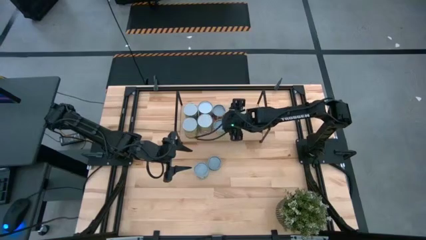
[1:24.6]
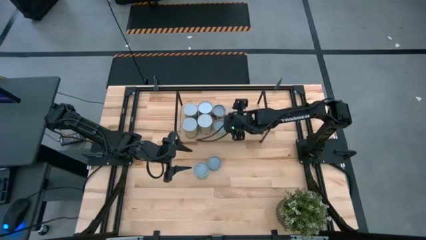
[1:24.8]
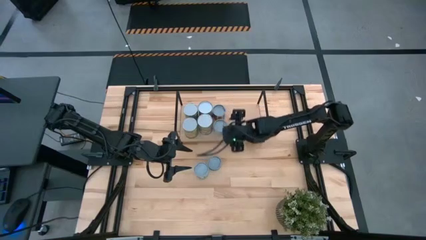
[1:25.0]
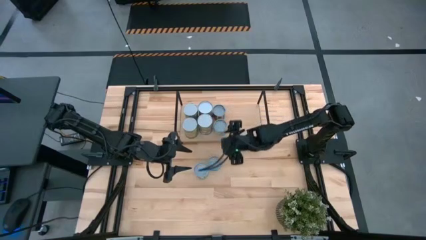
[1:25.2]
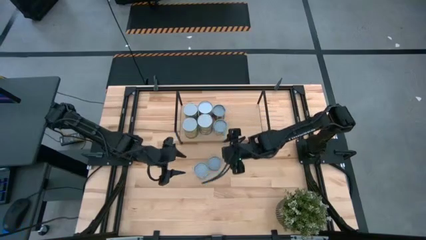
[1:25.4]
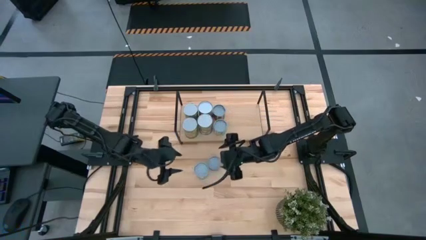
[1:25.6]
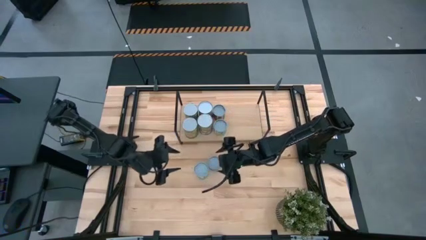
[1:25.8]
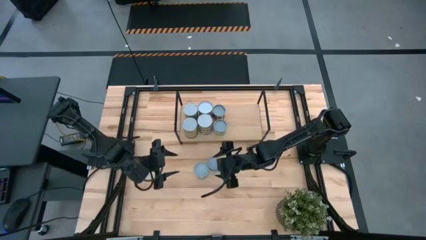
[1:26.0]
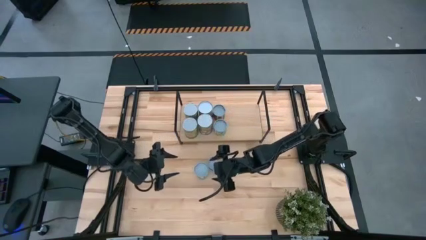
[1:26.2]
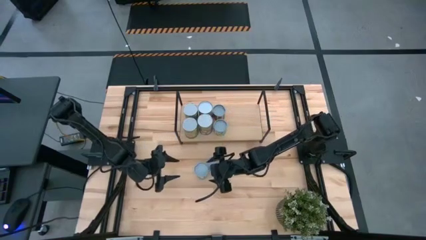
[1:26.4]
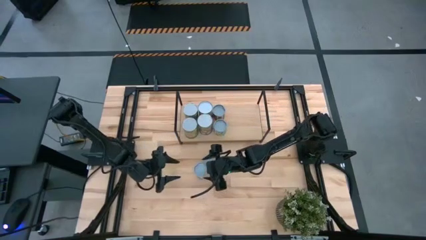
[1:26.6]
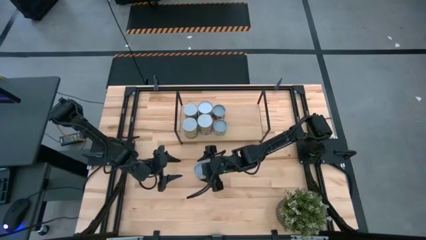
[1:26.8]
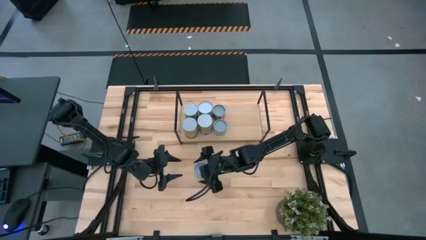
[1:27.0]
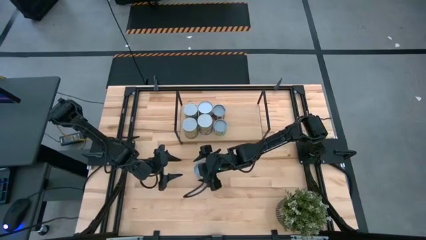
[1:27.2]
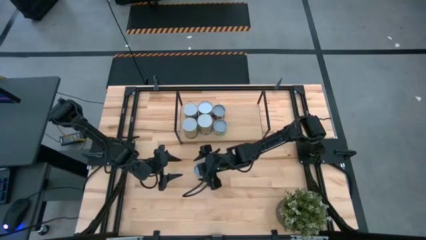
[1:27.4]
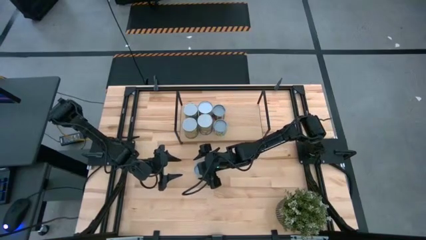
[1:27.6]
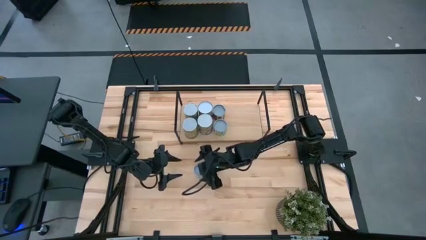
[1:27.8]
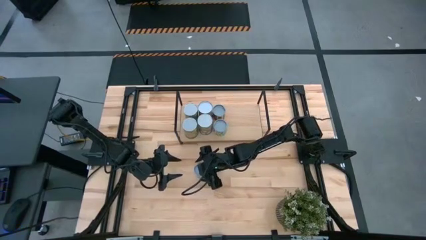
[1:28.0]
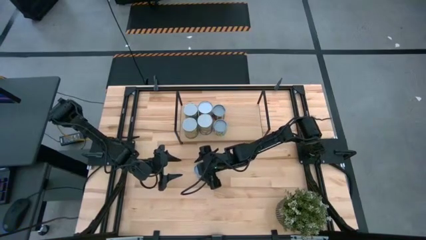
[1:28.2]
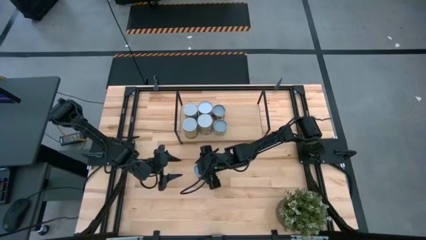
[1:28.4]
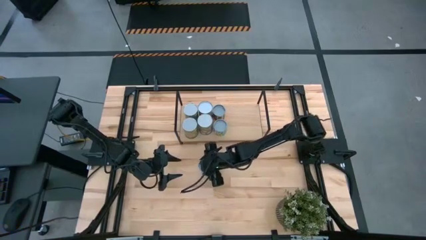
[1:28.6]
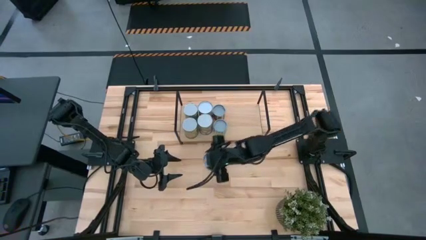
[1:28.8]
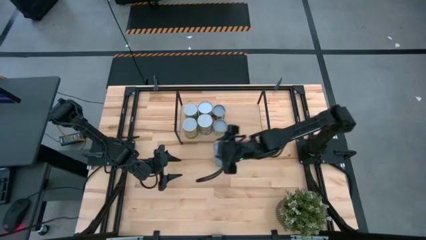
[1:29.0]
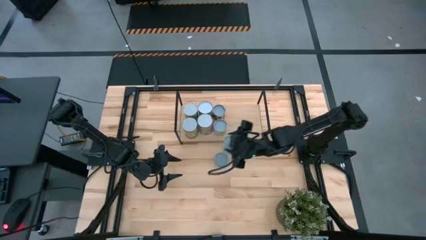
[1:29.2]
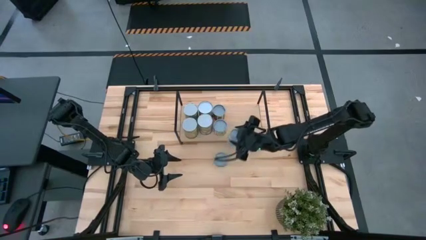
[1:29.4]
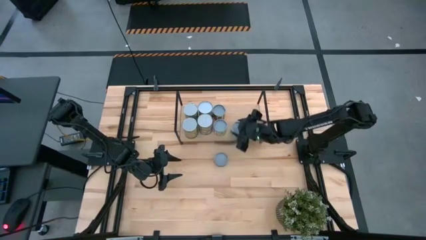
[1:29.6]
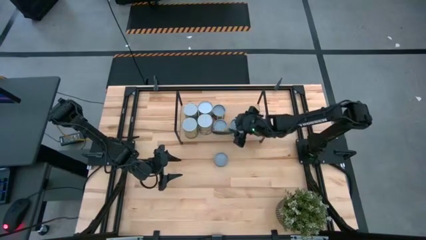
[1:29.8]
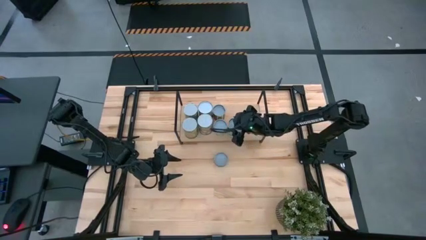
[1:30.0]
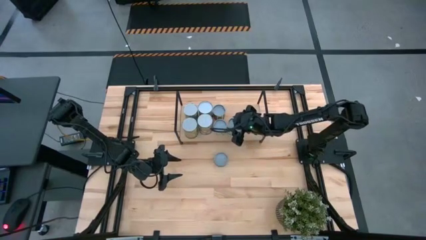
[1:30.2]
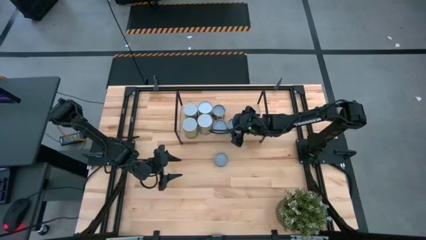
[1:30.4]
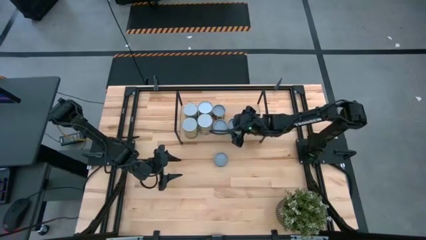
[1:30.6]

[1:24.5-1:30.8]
Task: Pick and place cans onto a shelf
Put the canned mixed vegetables on the shelf

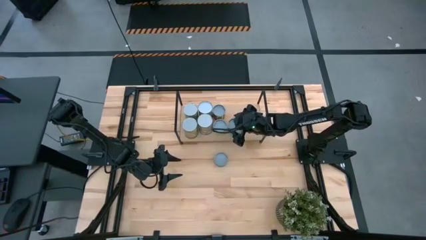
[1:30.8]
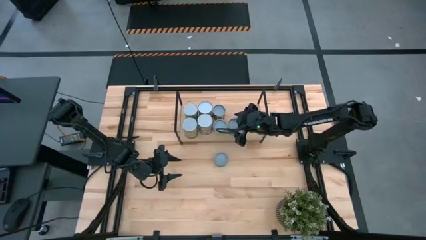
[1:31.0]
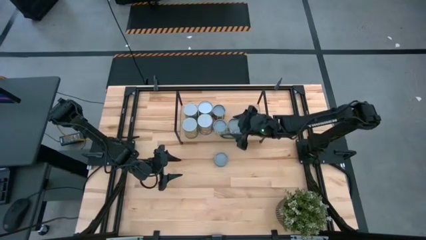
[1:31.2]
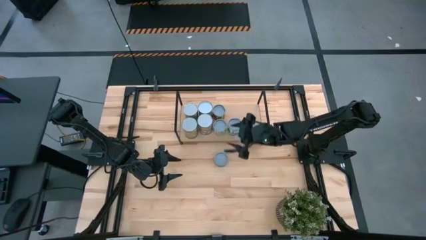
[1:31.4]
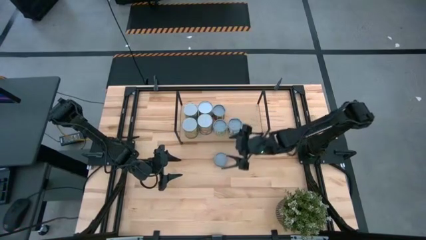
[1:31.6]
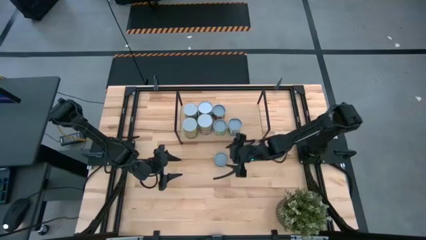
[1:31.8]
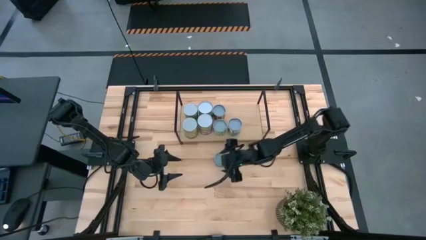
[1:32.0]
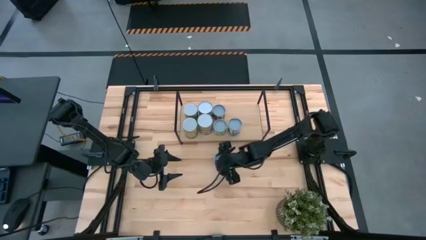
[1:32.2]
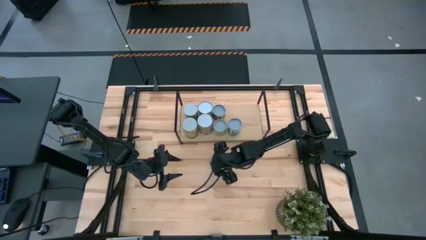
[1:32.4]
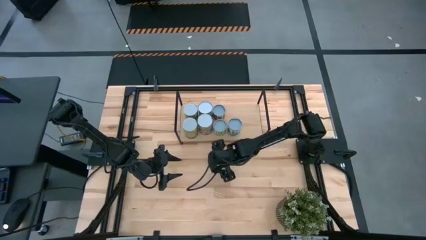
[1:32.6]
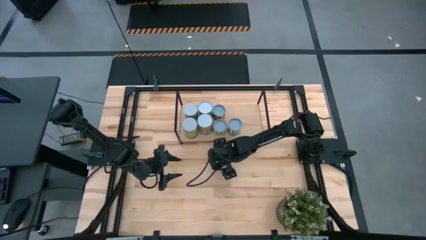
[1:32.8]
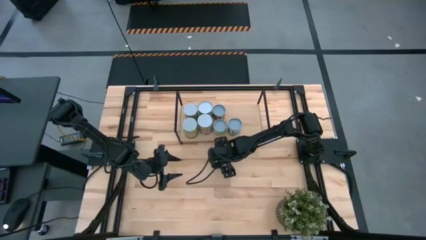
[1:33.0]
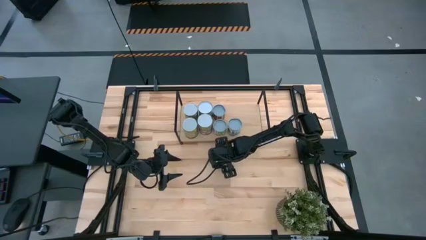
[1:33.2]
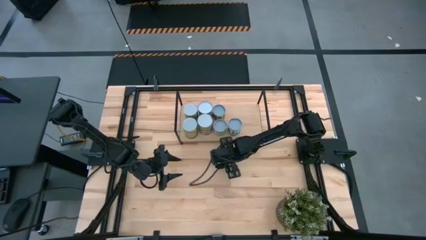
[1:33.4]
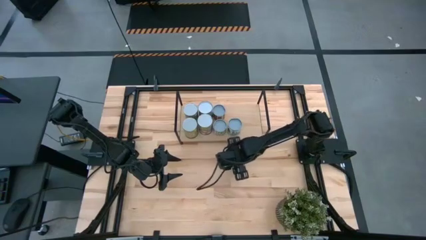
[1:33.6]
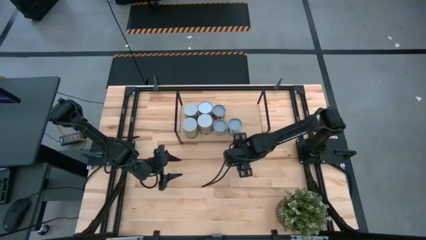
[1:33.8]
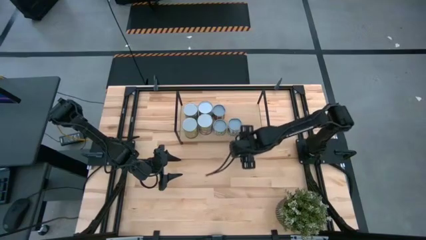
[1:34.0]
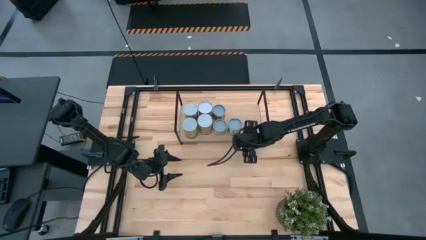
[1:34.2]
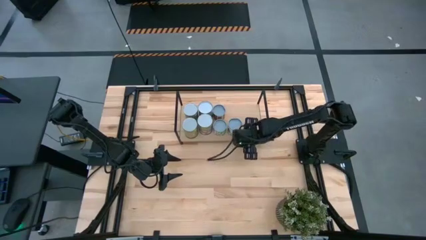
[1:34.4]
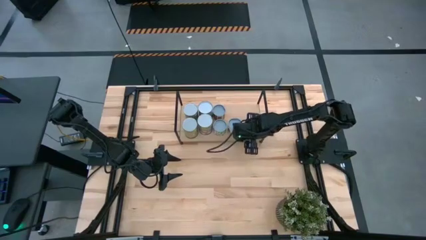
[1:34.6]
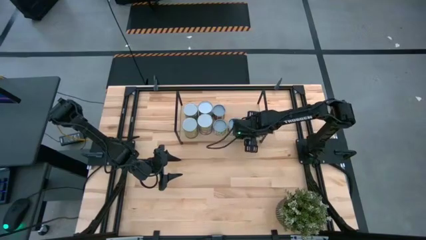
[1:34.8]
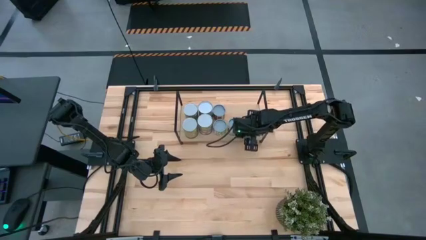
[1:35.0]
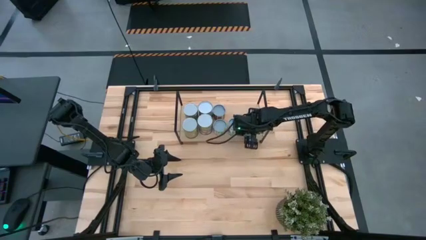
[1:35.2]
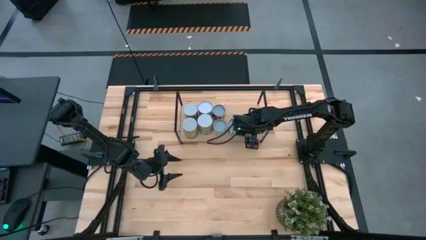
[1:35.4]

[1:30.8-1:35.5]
Put the canned tuna on the shelf

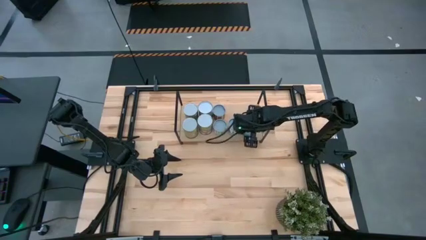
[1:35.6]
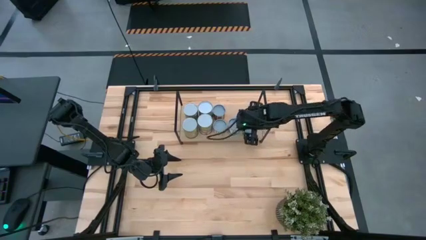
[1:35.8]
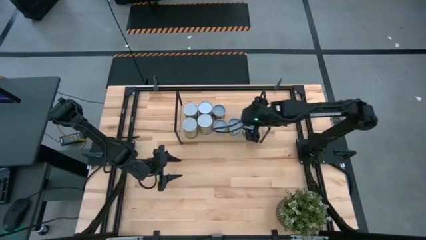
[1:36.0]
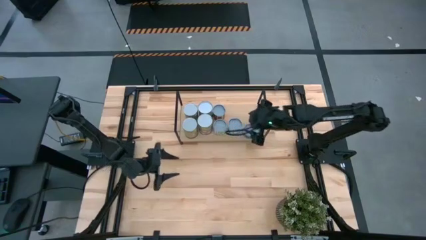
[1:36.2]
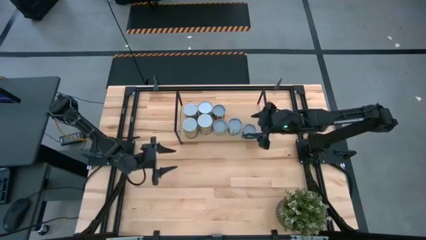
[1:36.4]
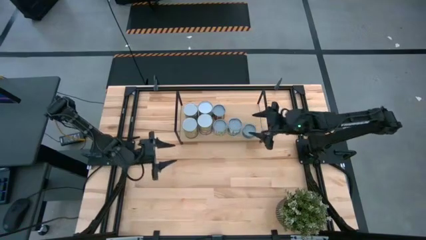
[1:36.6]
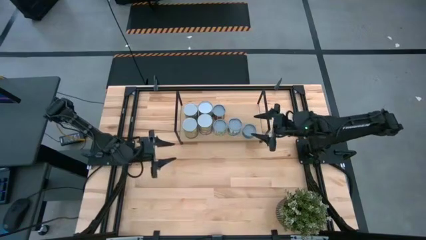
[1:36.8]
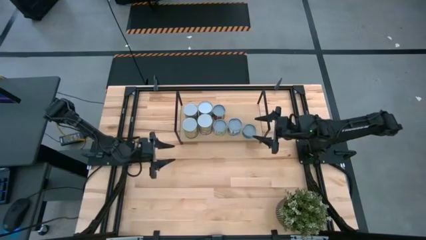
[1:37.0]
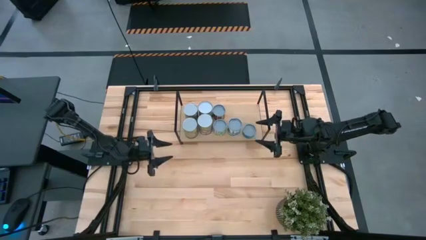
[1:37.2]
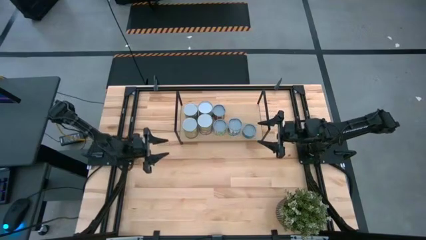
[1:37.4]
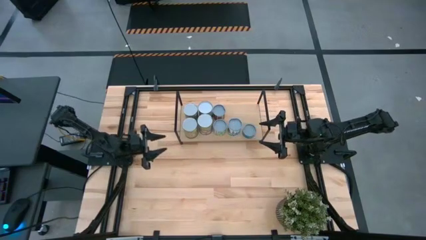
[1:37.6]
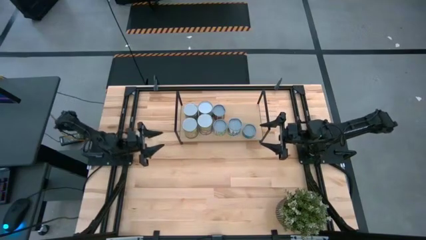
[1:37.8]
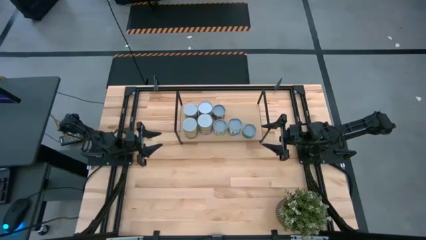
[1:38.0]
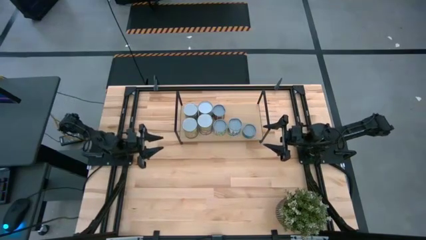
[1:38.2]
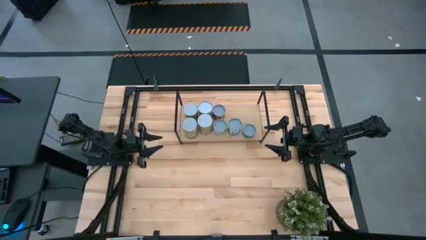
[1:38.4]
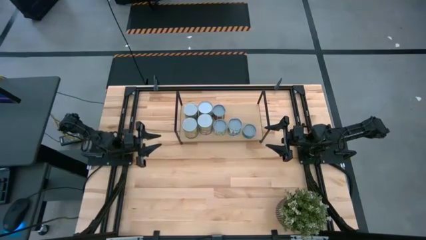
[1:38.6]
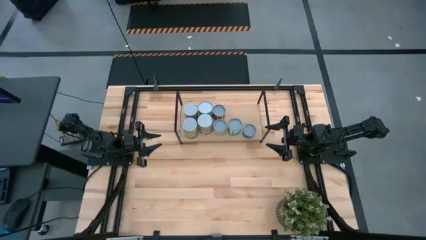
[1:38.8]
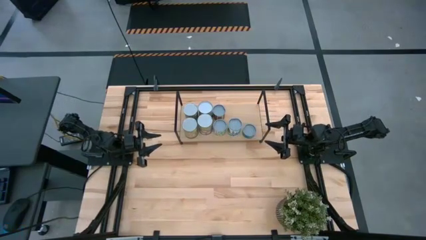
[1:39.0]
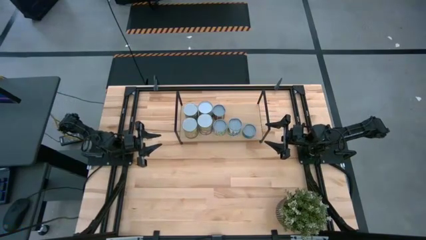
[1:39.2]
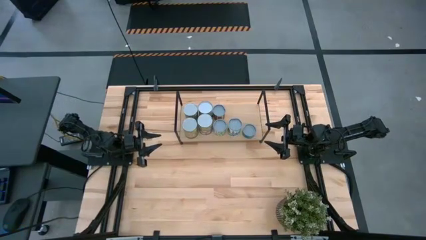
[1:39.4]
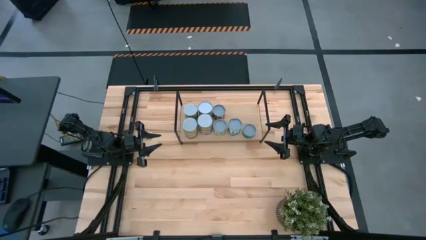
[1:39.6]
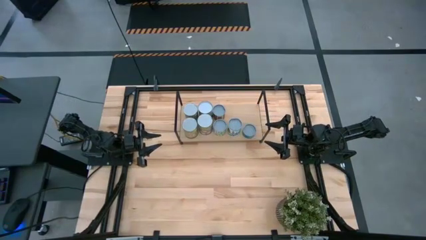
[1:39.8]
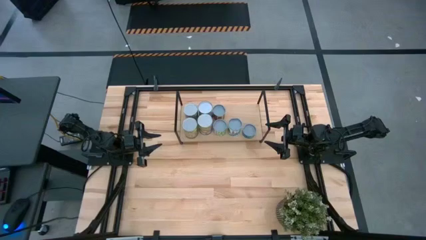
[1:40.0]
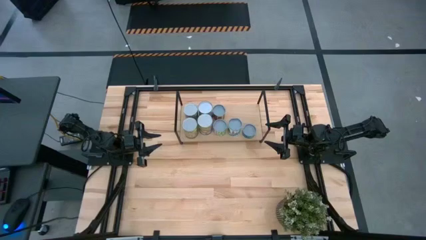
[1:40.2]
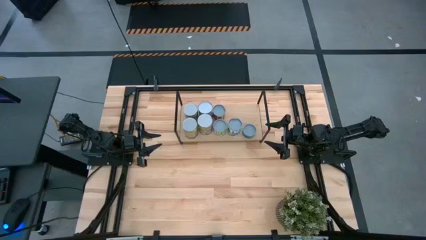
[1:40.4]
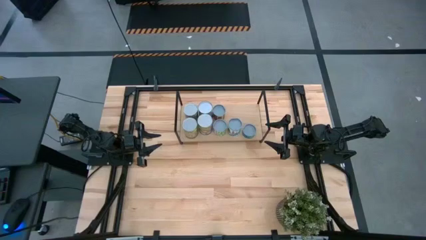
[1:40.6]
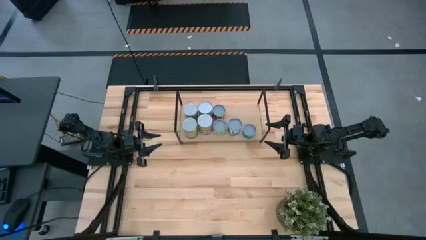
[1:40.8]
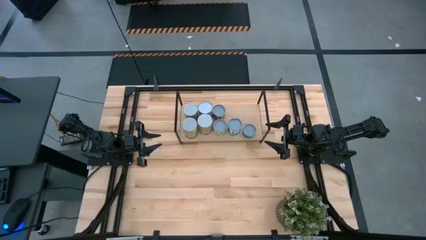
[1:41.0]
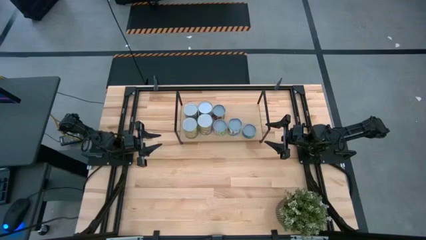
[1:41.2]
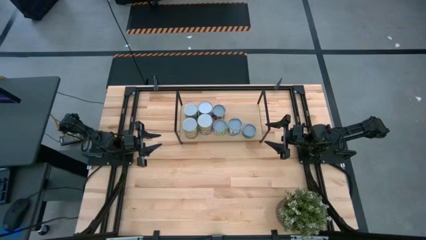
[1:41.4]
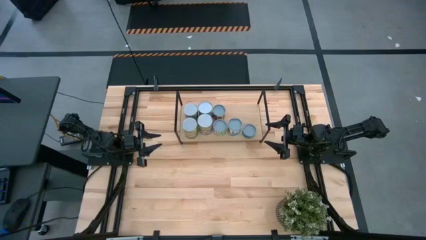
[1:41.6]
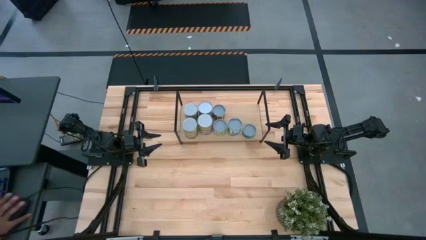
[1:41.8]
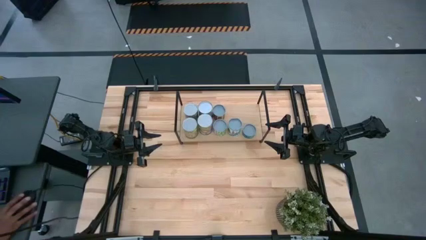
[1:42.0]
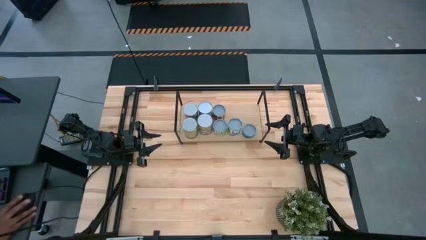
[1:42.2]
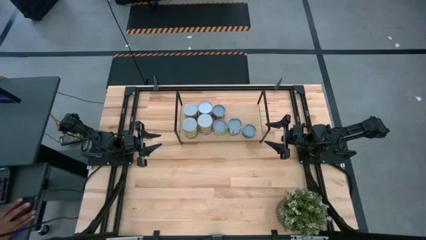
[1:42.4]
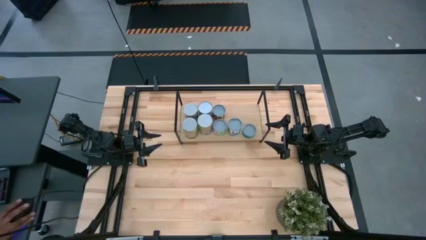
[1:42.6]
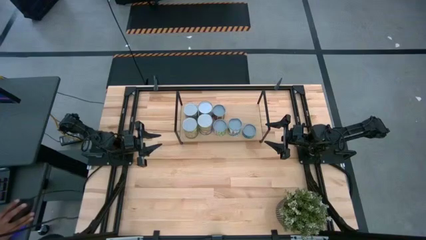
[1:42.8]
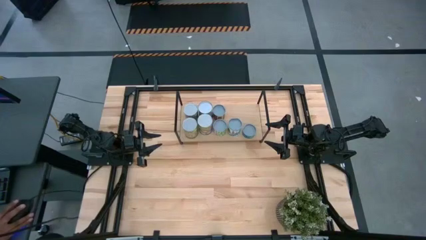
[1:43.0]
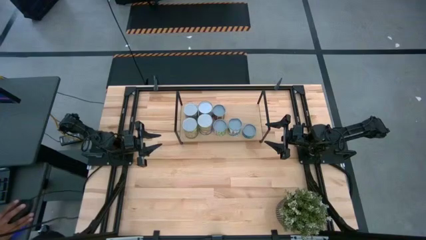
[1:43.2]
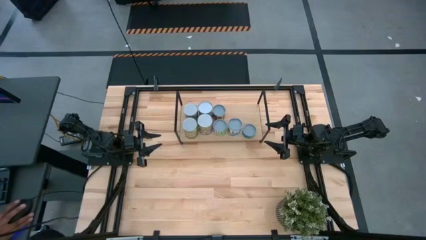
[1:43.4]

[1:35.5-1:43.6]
Return to Home Position
